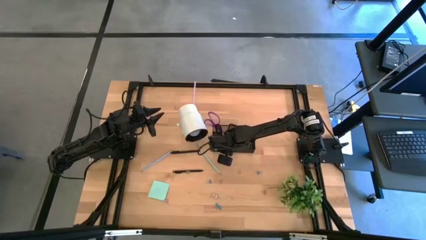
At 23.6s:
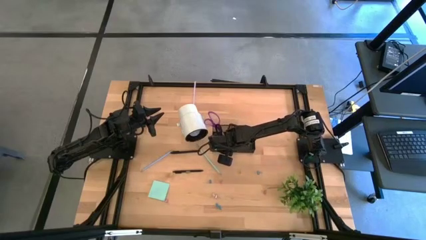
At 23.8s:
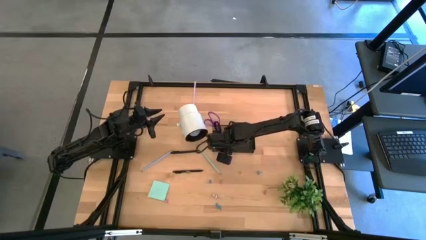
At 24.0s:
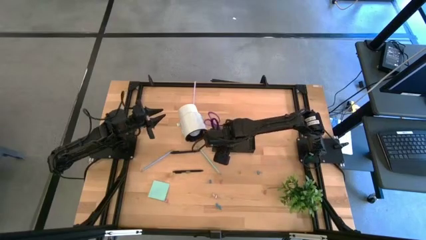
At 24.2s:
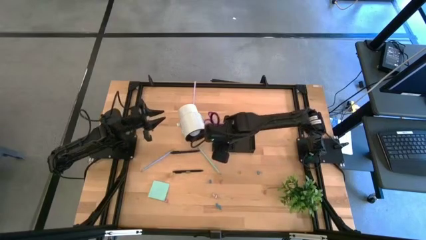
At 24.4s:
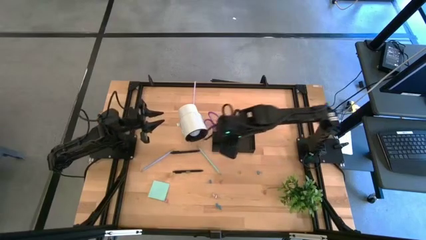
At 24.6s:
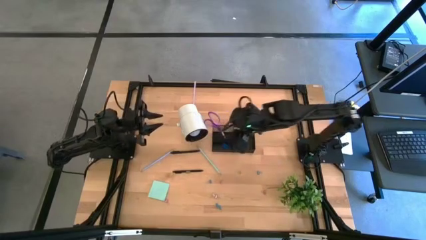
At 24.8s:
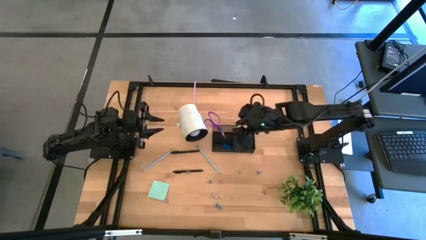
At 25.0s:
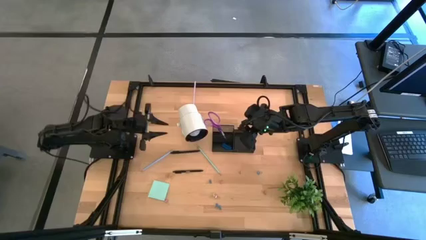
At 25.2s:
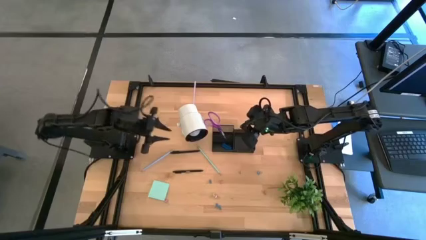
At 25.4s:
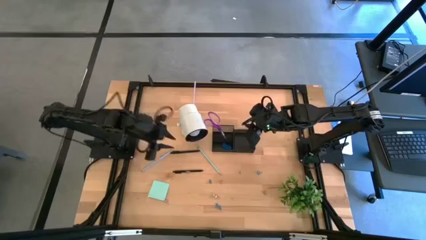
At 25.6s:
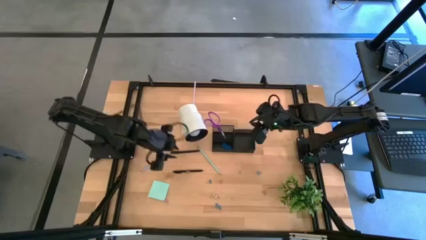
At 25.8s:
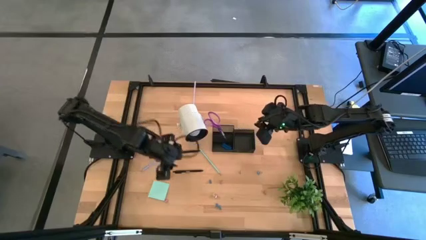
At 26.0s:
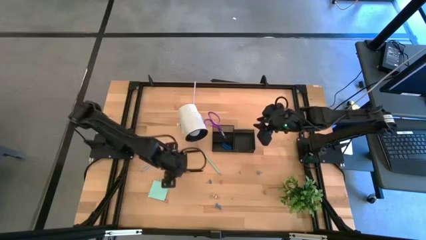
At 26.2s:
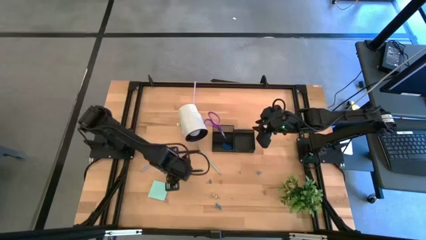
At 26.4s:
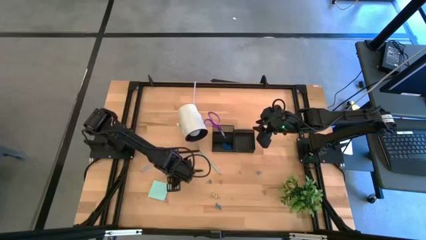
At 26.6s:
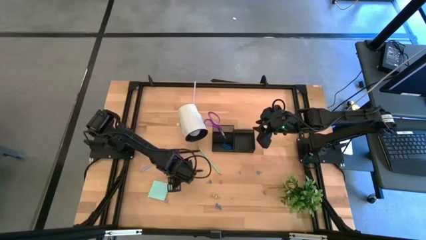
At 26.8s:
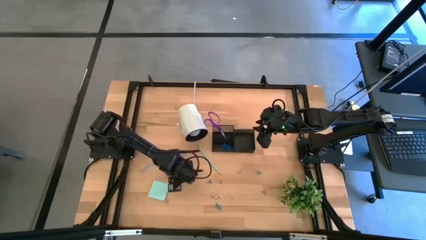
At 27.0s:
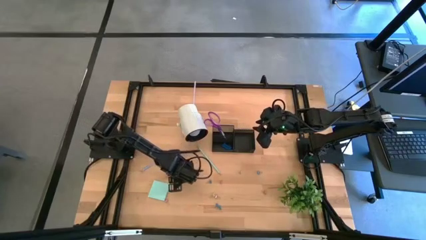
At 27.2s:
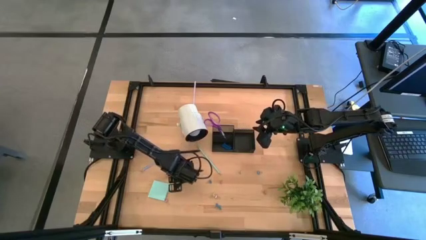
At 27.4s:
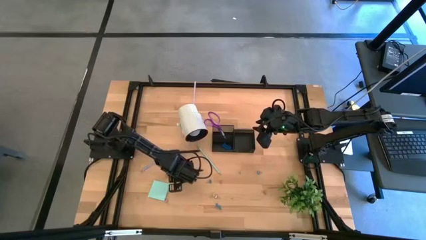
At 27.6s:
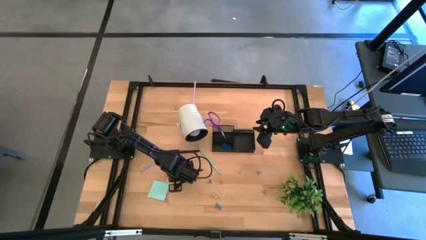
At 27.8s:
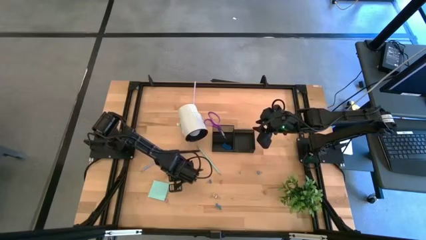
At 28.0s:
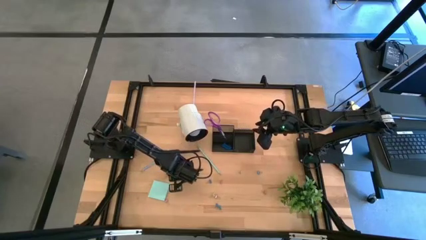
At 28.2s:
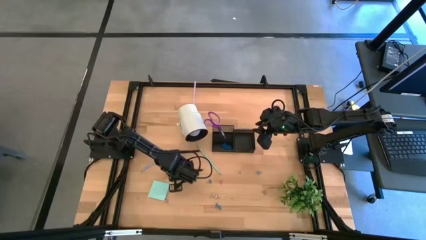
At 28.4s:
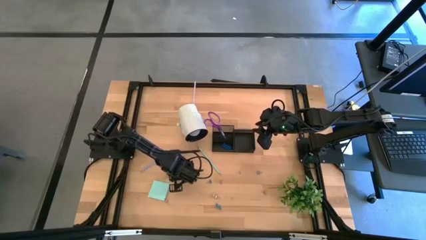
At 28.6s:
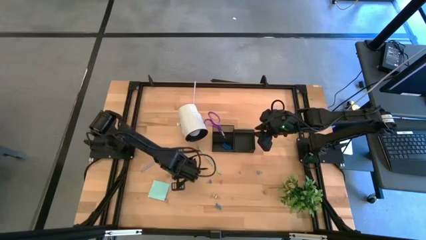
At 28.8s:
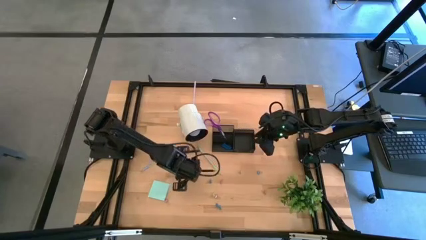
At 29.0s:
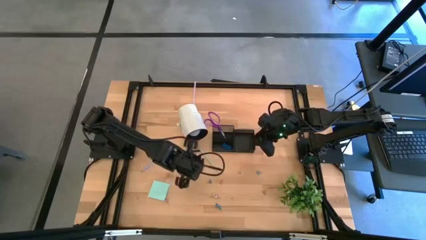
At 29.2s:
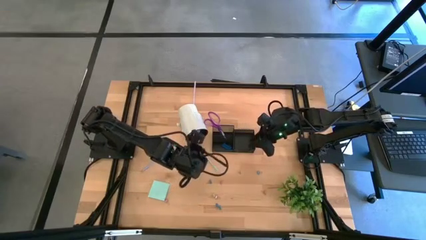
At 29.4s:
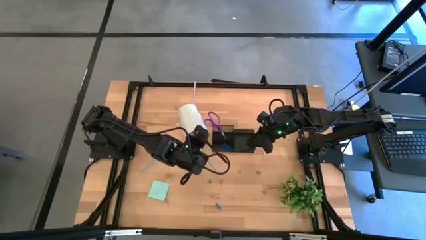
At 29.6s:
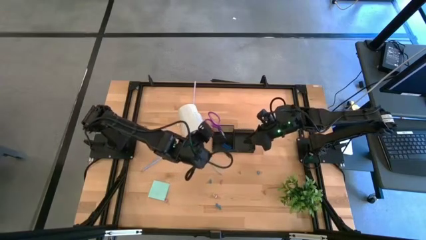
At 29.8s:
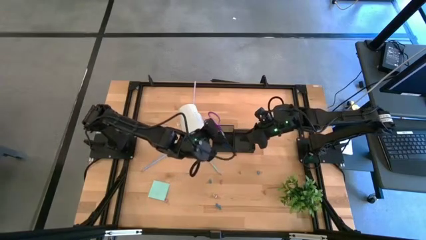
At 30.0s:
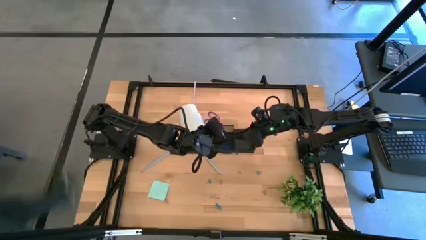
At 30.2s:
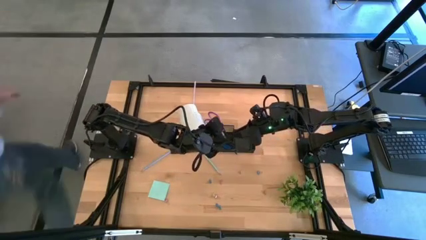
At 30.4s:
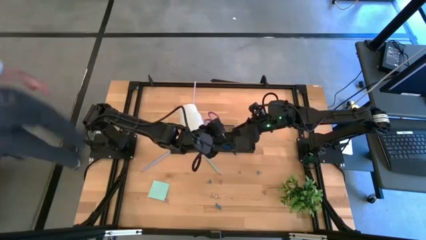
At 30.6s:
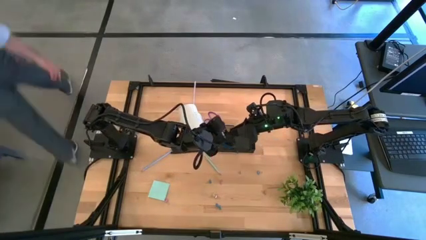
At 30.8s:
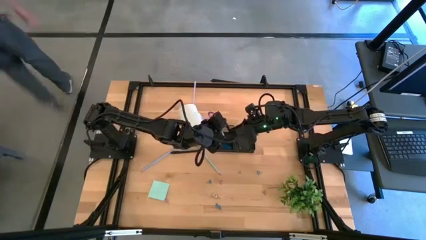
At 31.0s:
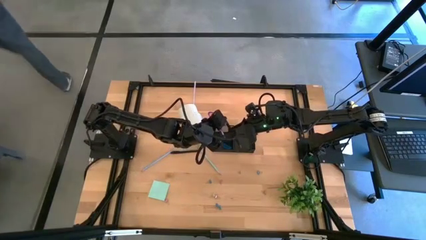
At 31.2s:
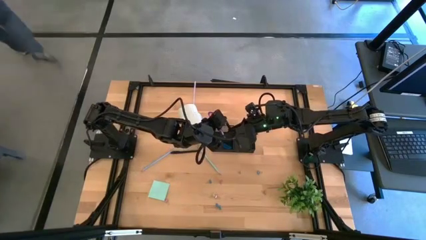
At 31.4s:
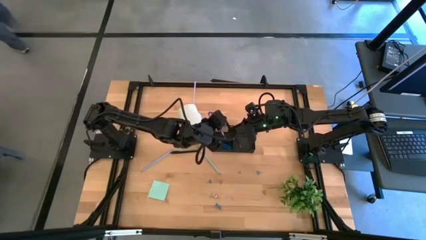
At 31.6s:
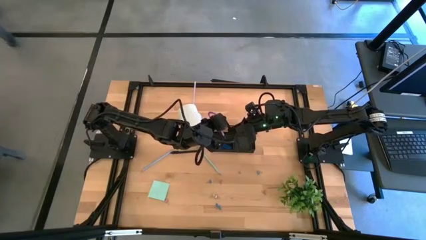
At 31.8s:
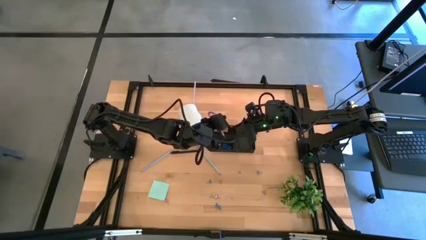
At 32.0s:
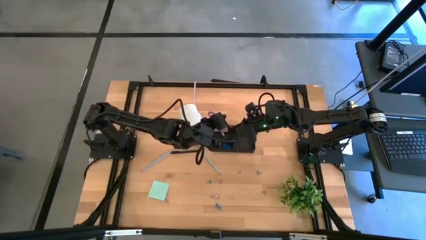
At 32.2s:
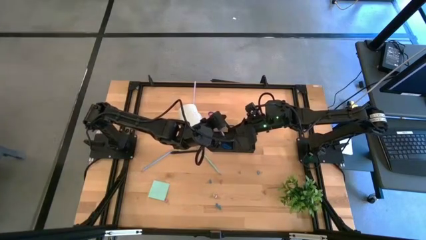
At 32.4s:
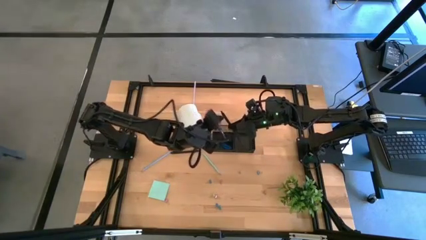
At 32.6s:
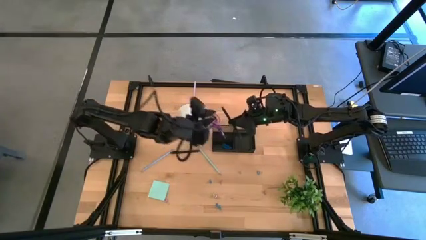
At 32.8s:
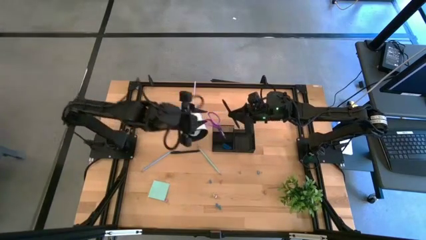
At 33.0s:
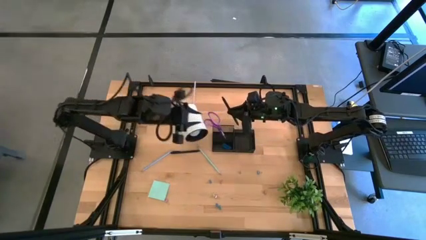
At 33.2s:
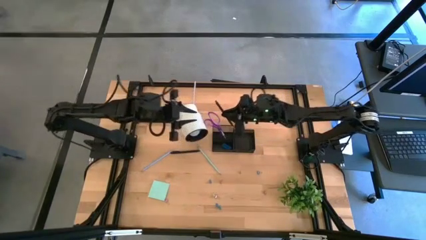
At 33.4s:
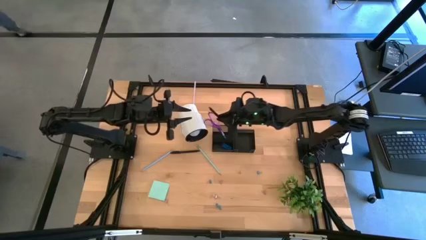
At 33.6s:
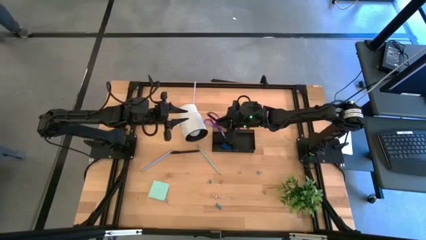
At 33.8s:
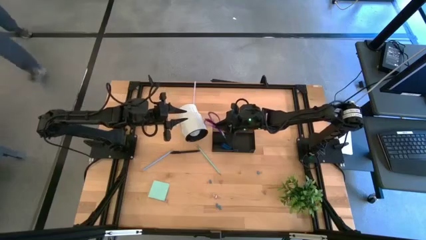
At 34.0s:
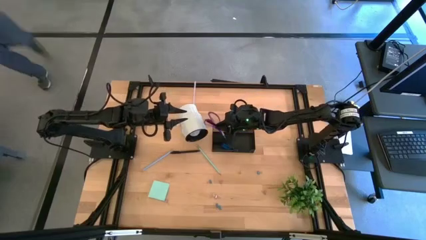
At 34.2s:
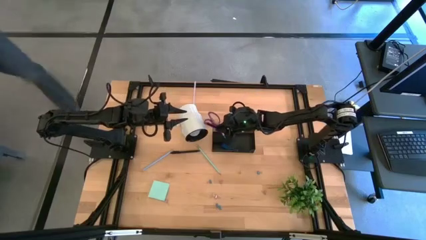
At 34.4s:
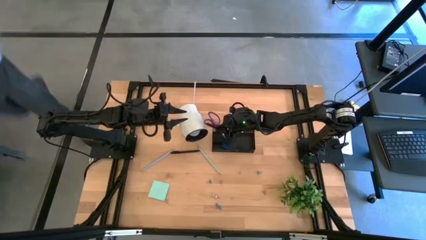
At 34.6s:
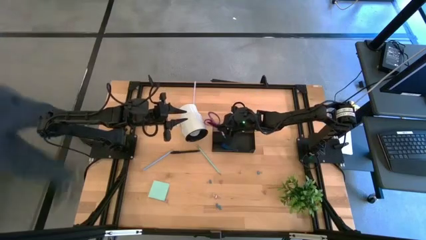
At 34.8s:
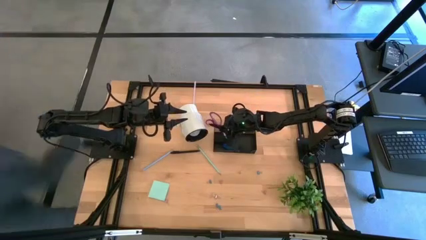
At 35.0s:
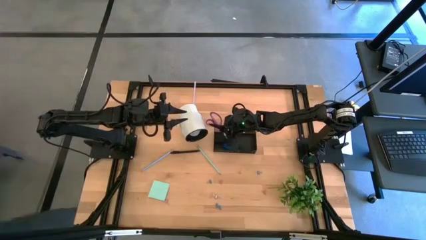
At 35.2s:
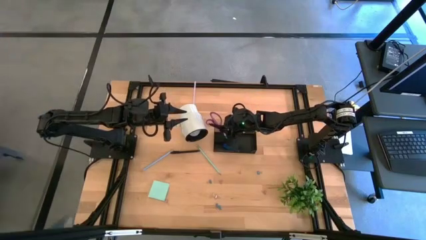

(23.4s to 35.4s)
Task: Pick and place office supplies into organizer
Put the bottom black pen into the black desk organizer

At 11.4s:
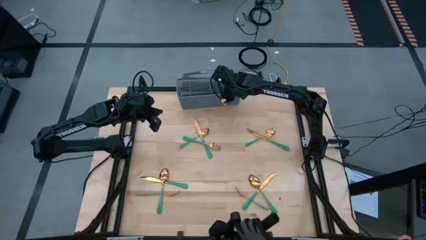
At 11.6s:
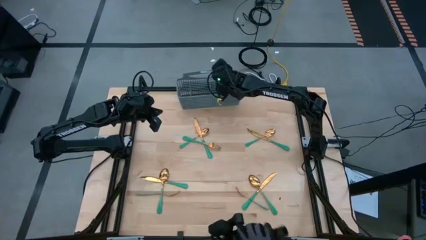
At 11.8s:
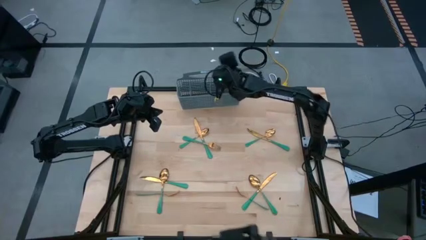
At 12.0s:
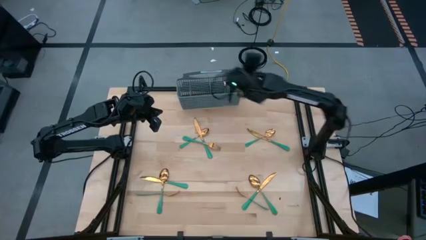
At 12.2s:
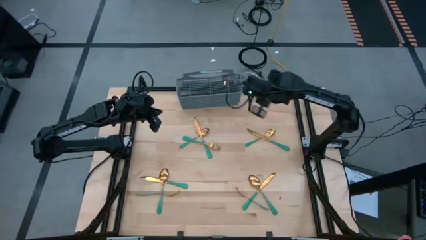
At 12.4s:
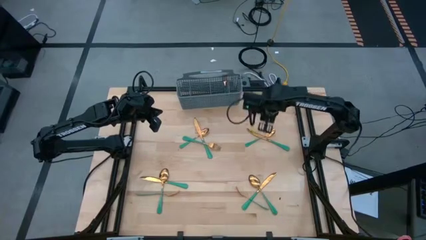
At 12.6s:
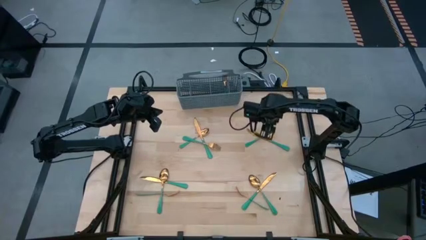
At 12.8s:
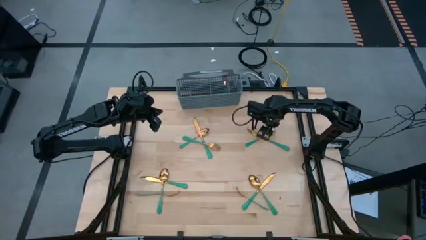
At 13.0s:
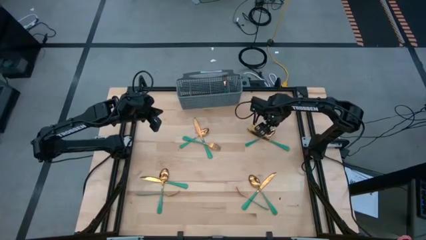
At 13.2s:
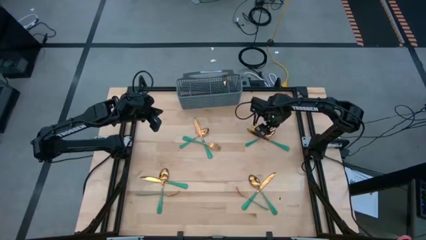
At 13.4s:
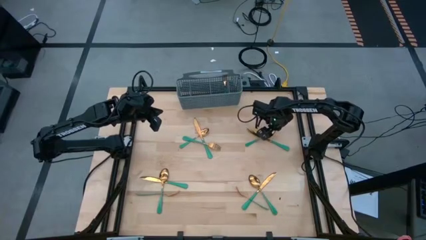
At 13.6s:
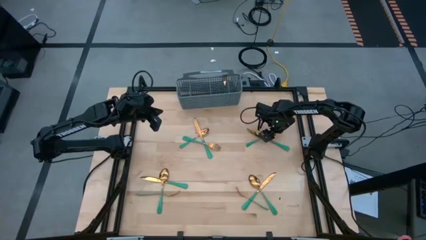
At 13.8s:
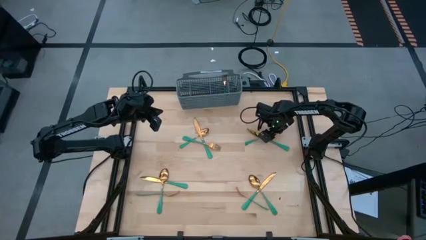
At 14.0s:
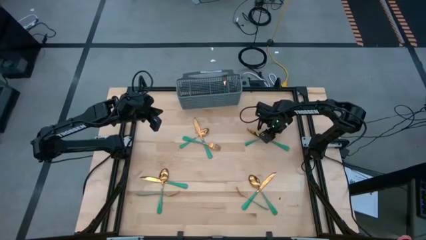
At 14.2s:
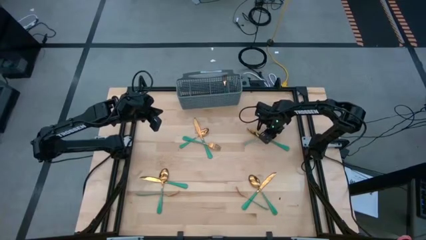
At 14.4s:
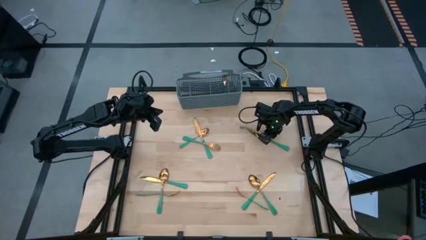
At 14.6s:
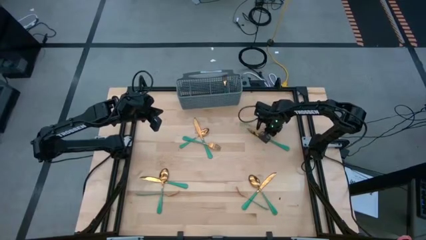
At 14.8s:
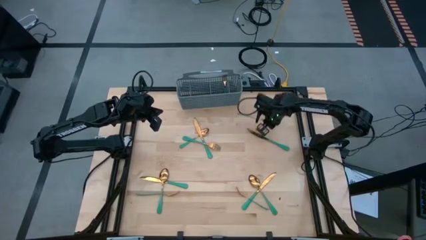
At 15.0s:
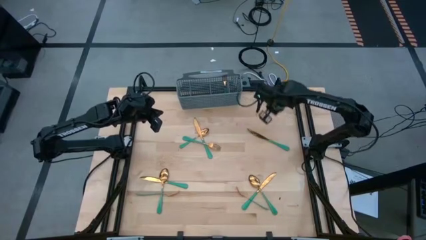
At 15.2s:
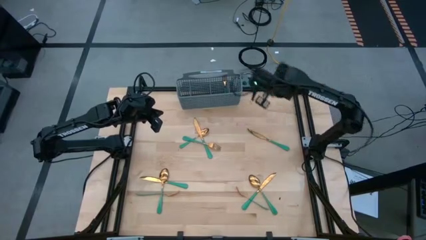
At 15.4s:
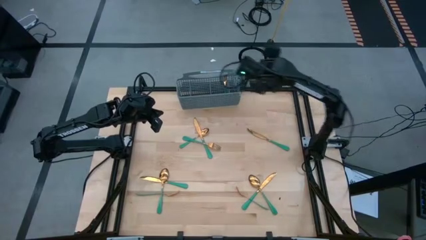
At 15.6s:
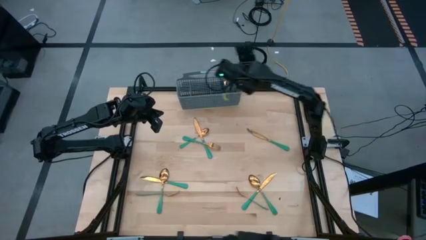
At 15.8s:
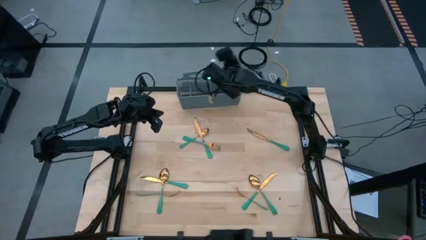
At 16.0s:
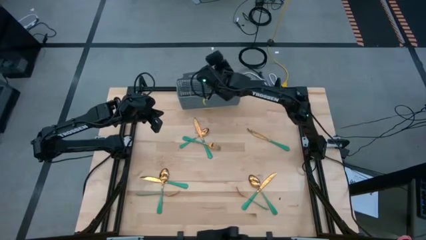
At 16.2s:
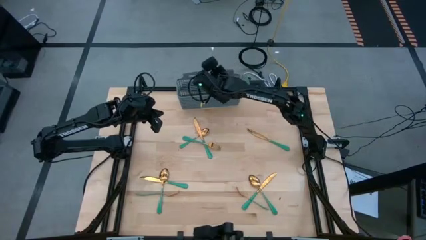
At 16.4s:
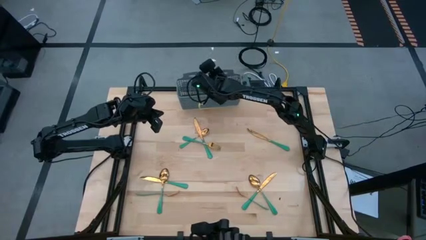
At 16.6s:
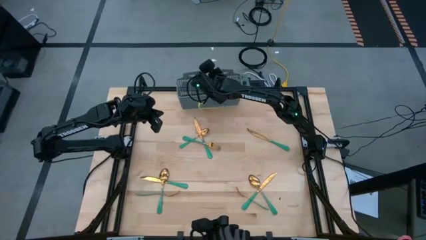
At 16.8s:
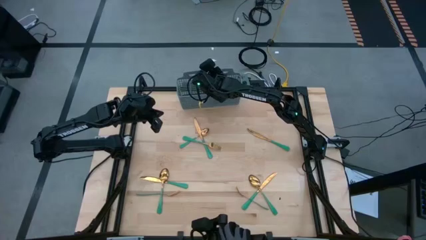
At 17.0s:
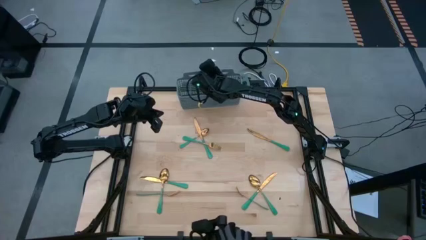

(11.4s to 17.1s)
Task: Sort silverware
Put the green spoon into the gray bin
